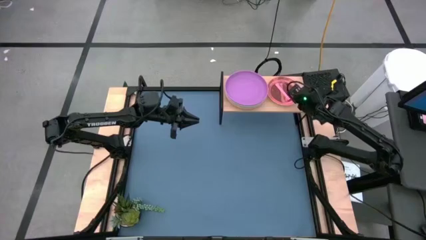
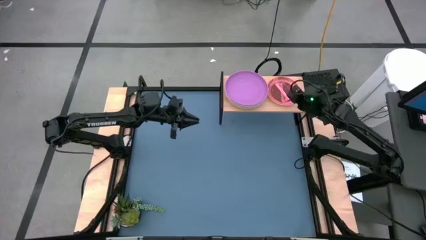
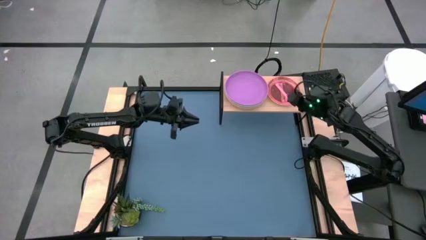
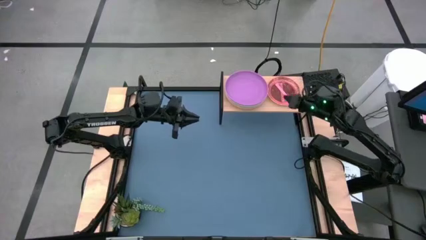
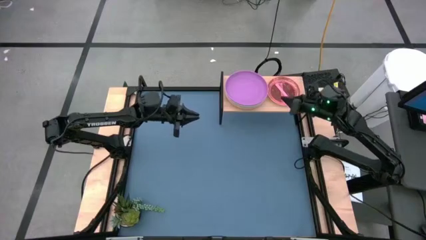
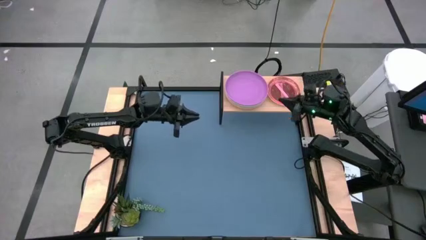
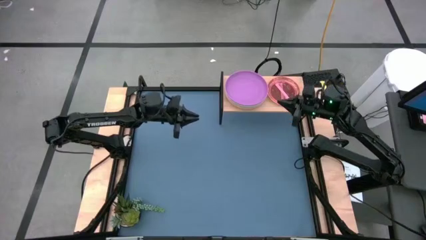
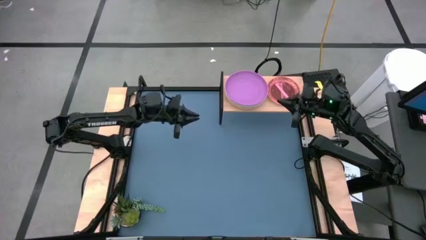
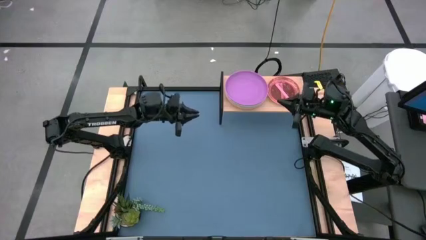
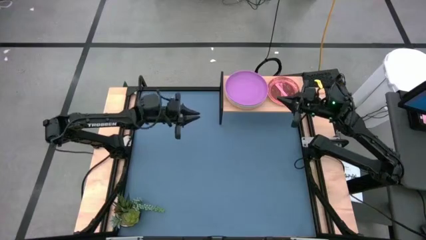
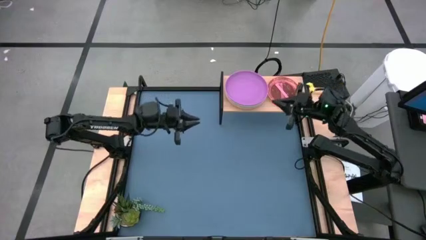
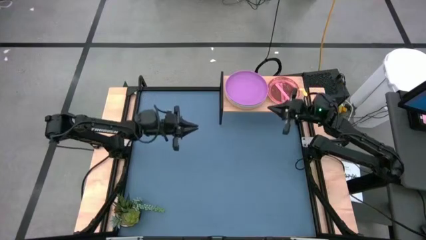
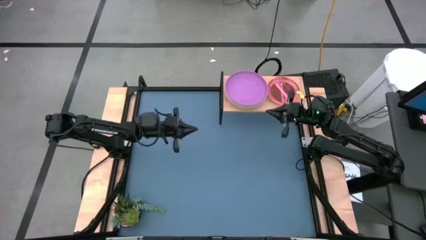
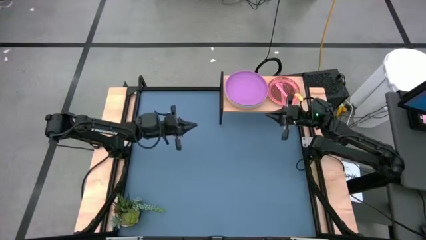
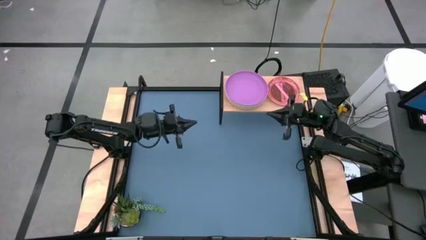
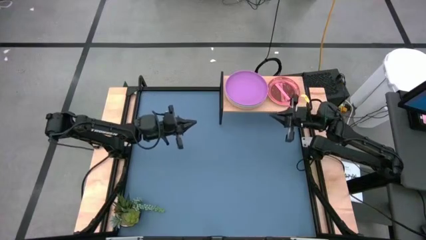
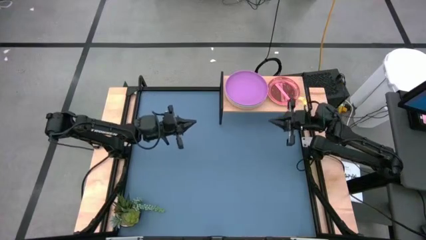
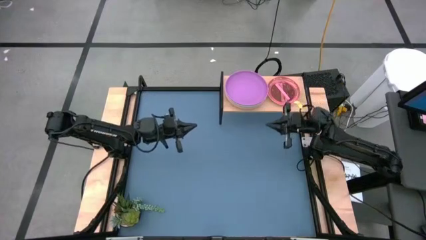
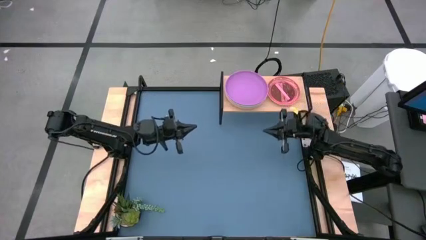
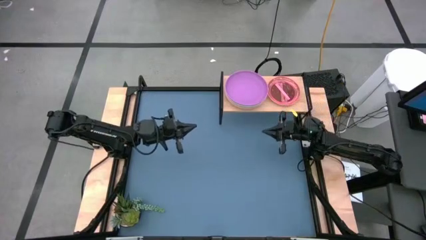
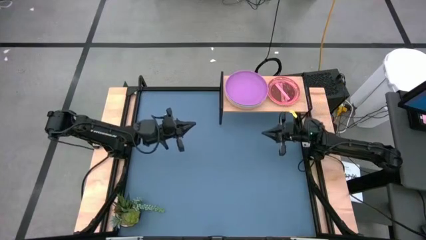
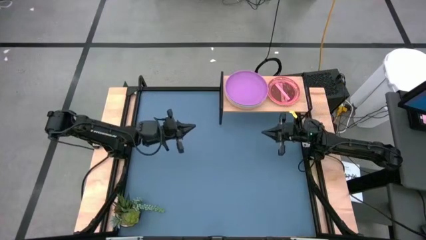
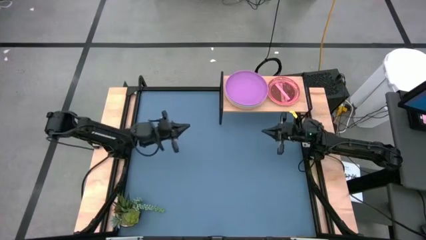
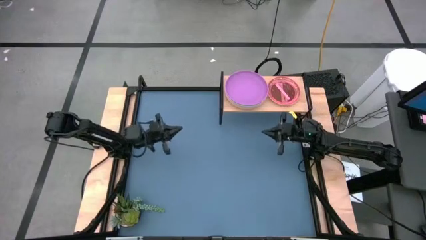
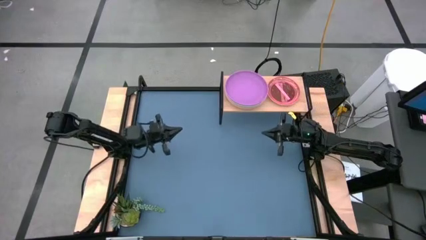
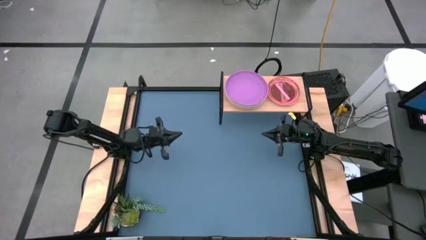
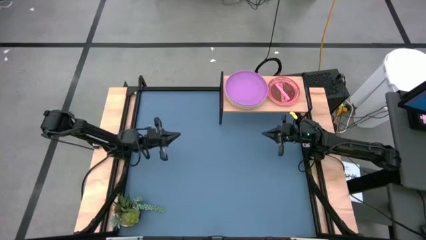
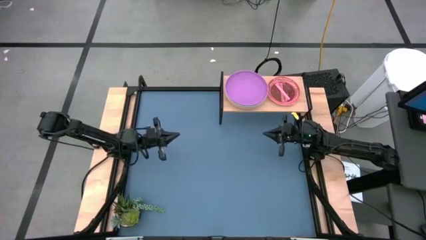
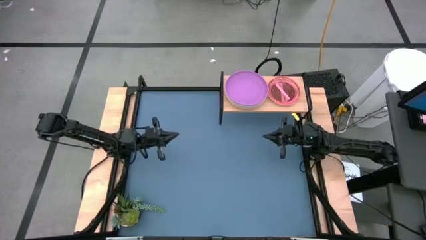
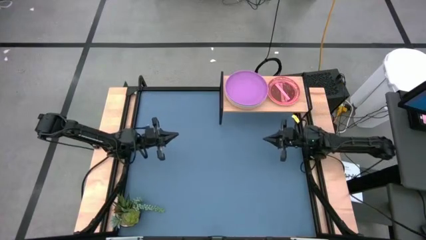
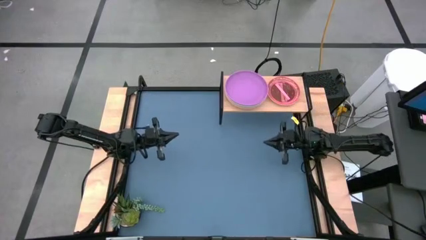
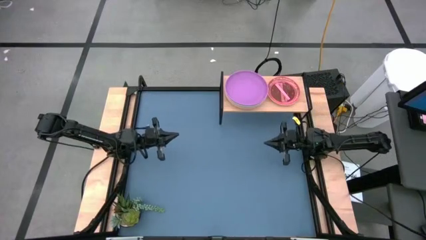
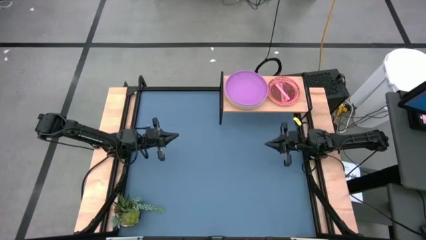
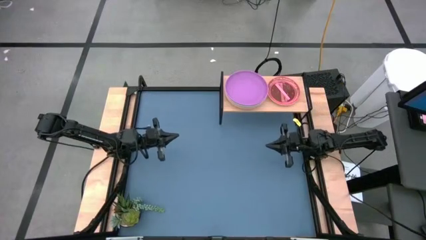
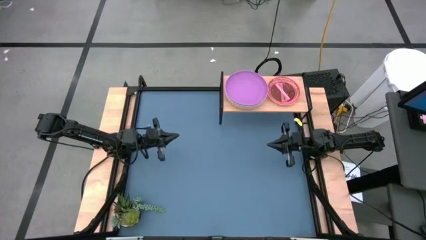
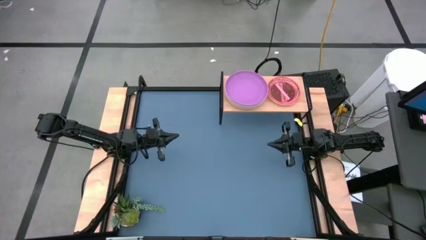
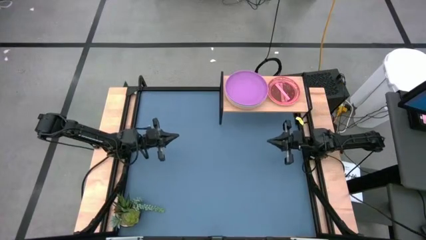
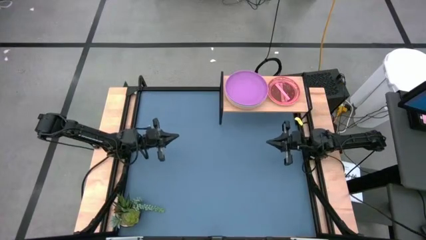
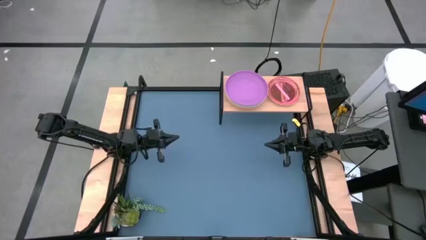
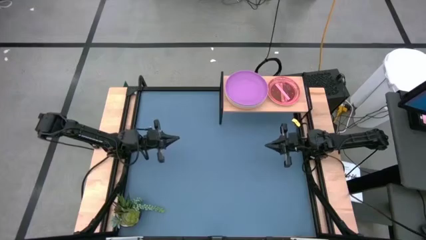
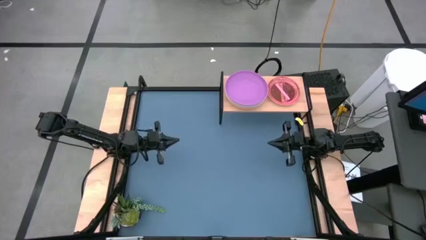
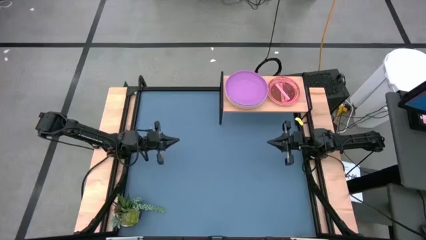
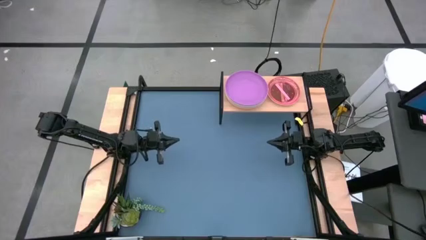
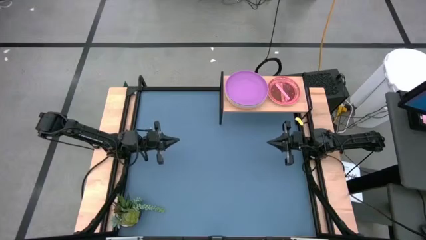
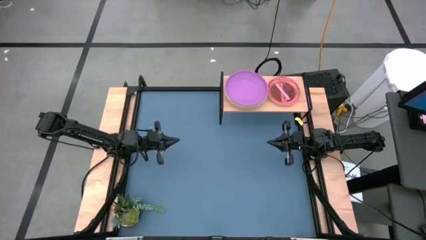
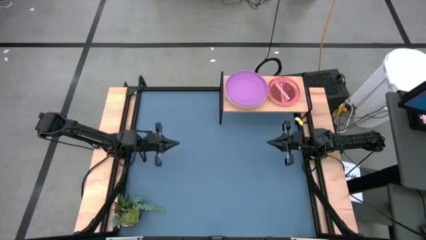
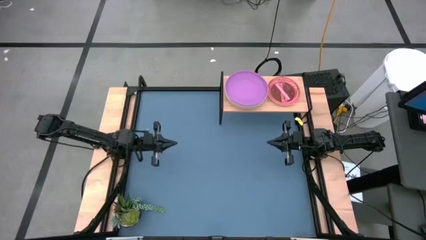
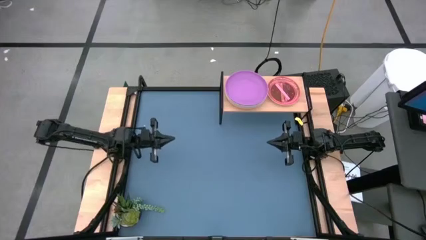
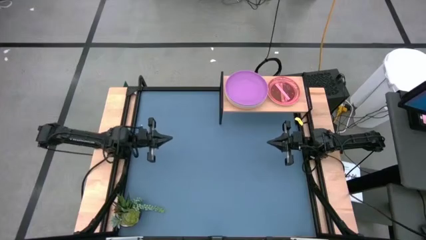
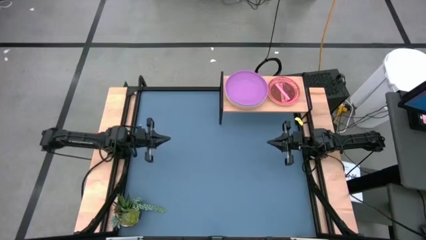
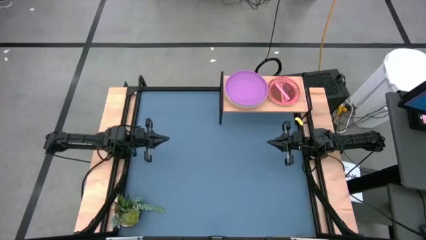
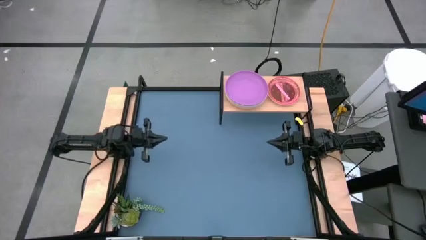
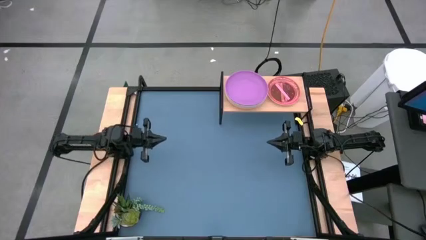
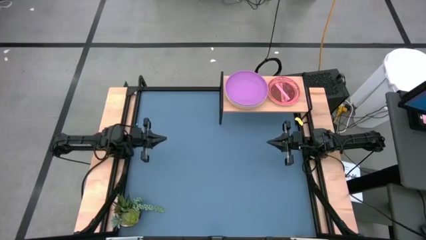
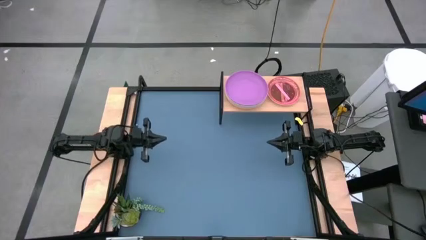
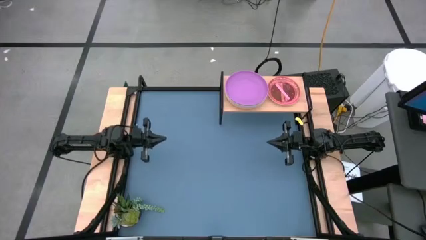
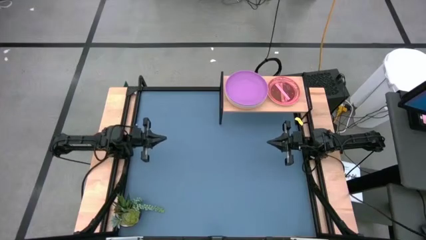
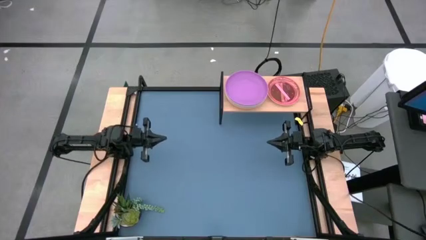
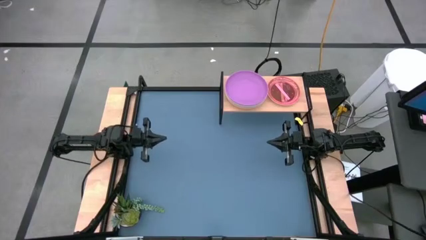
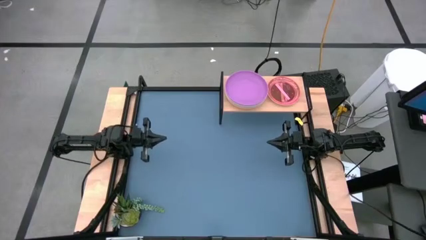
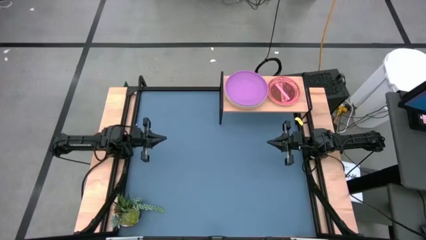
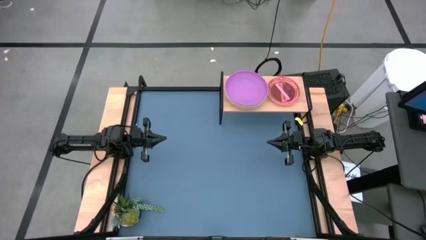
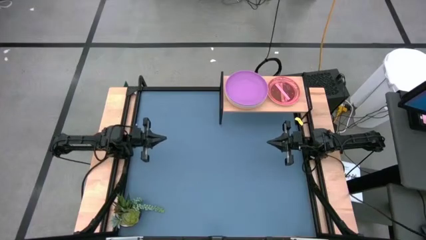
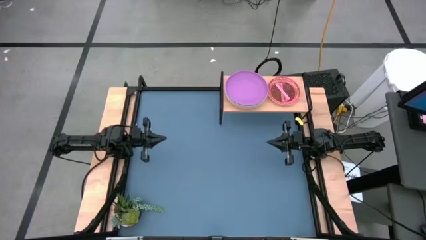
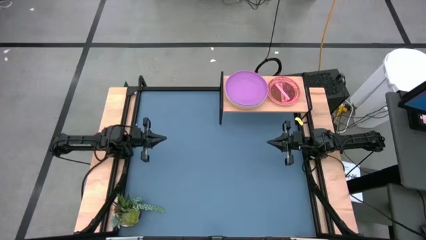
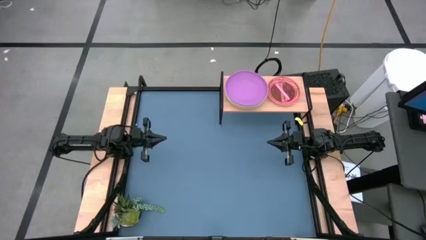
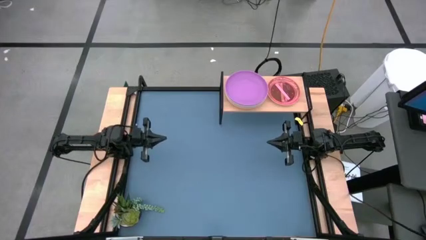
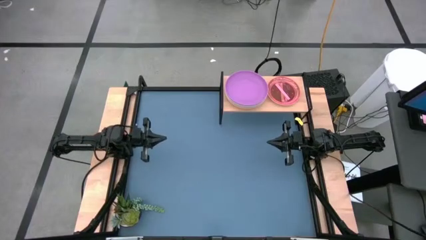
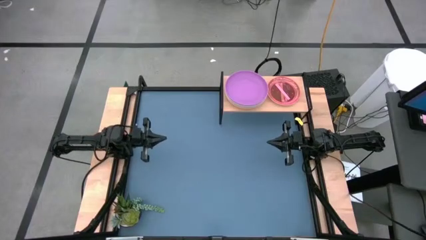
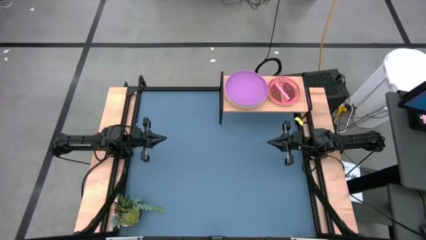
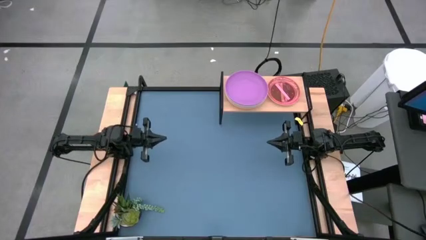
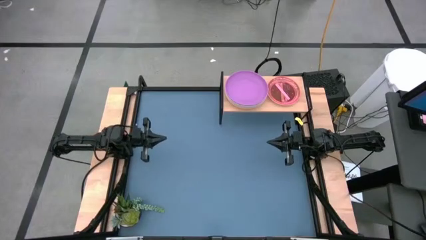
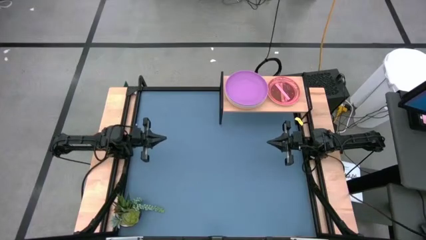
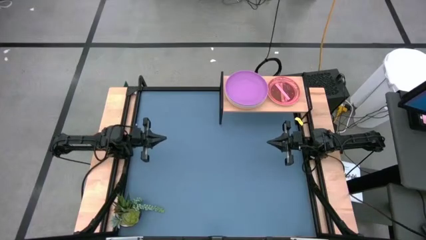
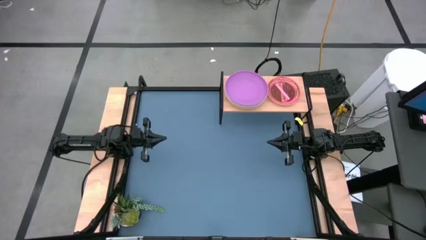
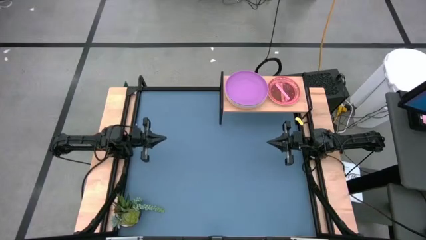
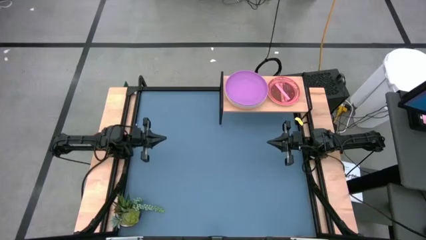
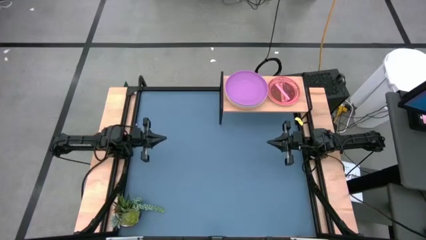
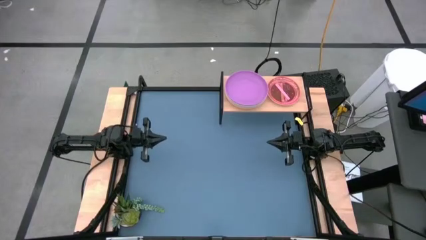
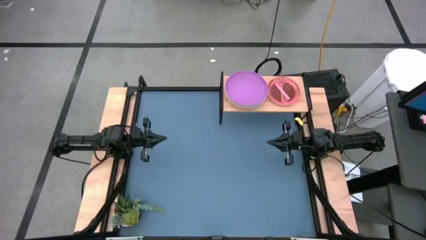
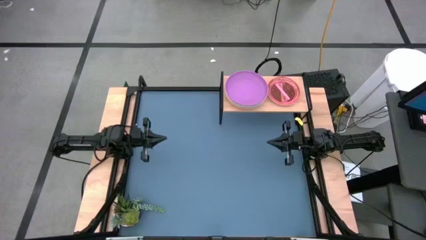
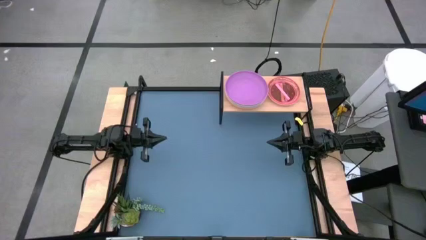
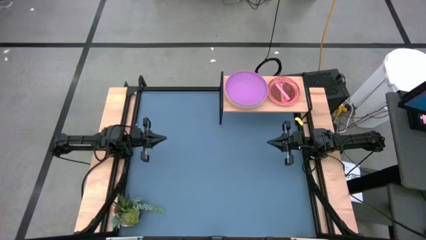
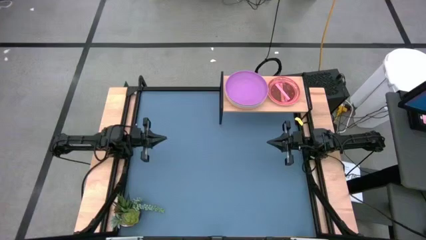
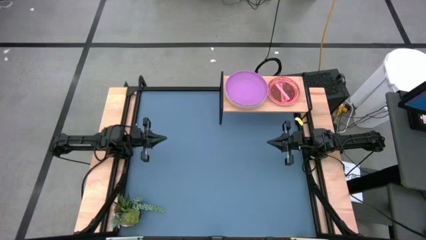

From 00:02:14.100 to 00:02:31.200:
Task: Place and stack plates onto a shelf
Return to Home Position
